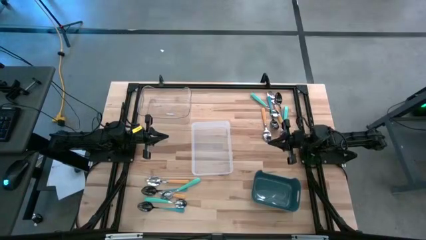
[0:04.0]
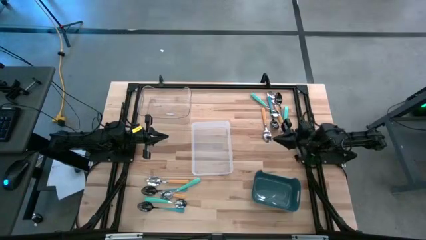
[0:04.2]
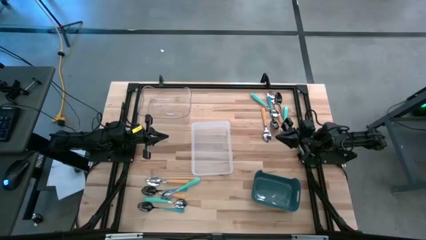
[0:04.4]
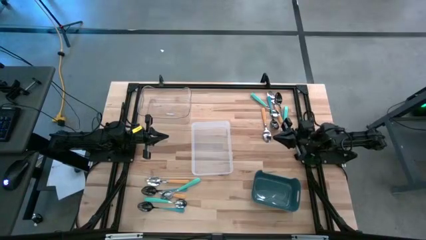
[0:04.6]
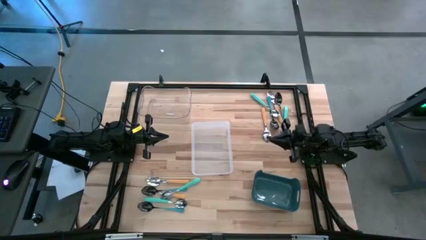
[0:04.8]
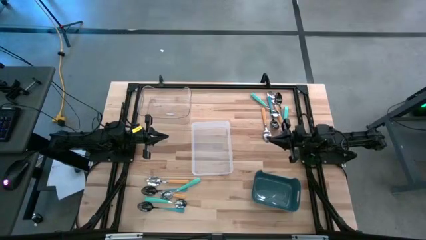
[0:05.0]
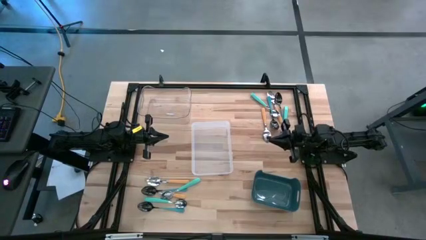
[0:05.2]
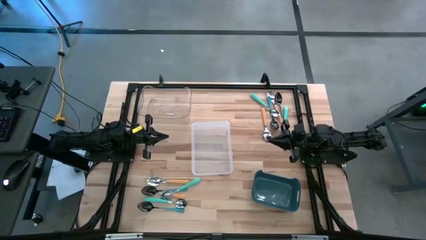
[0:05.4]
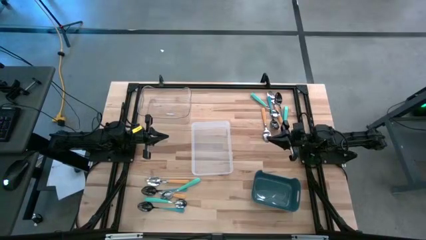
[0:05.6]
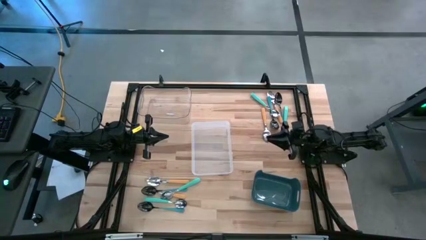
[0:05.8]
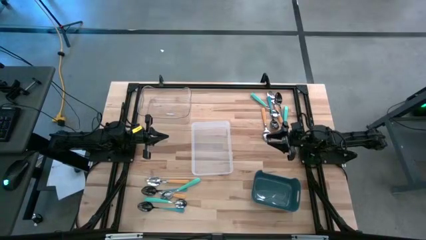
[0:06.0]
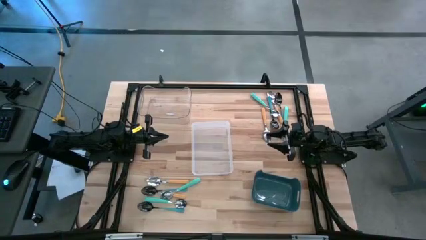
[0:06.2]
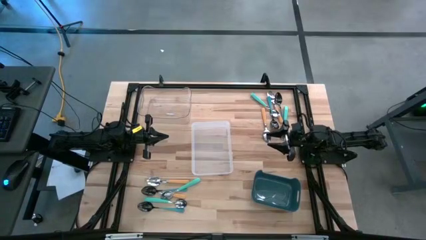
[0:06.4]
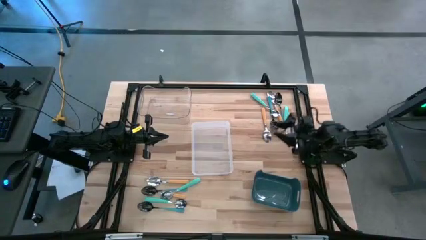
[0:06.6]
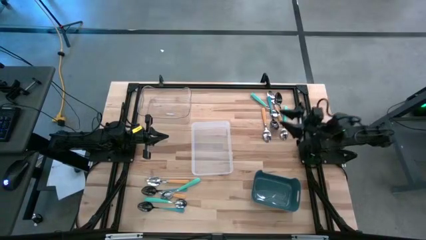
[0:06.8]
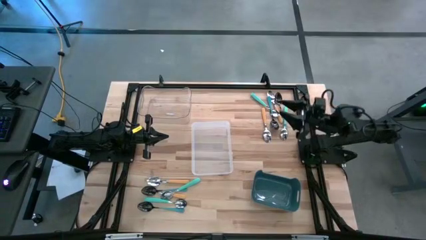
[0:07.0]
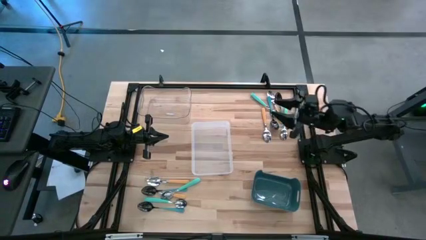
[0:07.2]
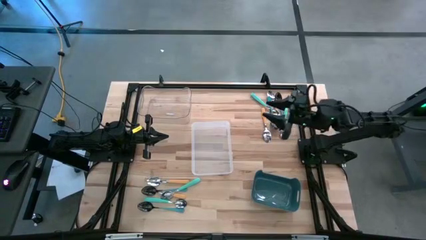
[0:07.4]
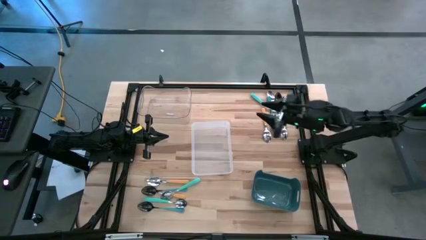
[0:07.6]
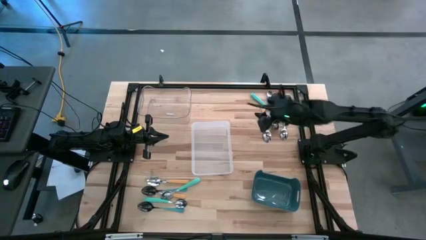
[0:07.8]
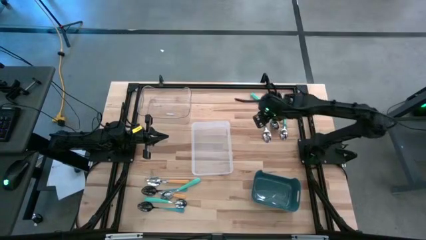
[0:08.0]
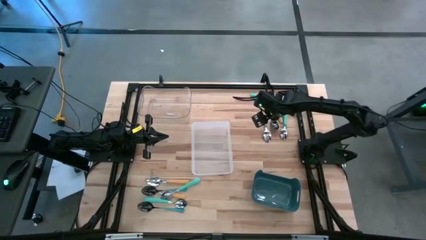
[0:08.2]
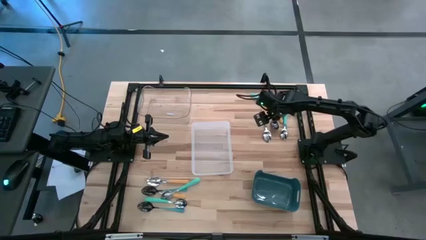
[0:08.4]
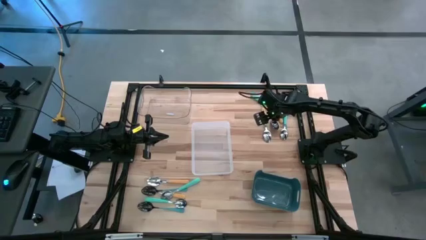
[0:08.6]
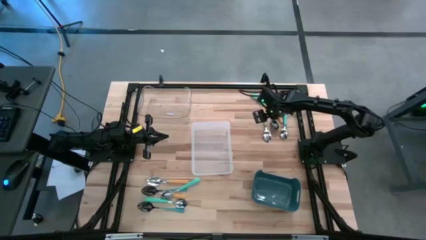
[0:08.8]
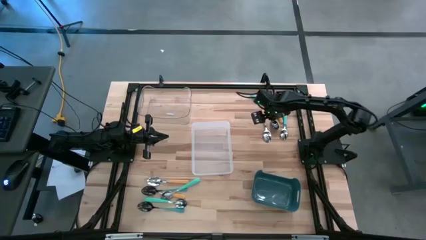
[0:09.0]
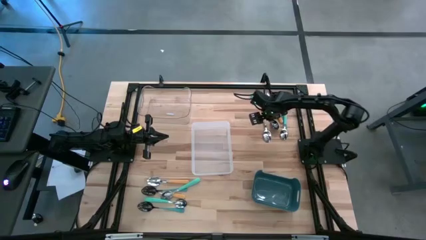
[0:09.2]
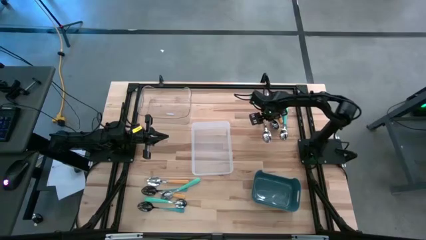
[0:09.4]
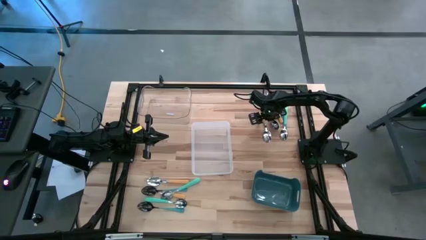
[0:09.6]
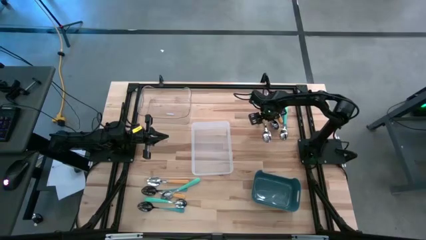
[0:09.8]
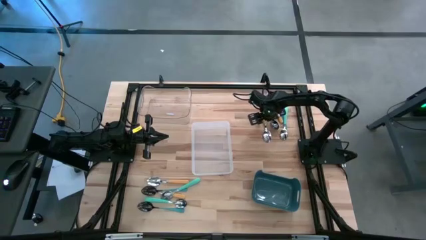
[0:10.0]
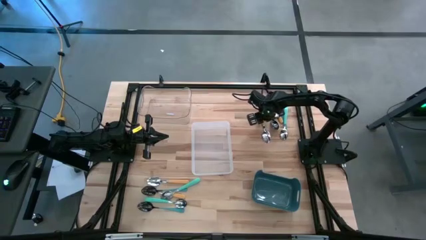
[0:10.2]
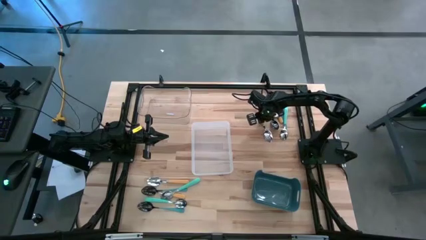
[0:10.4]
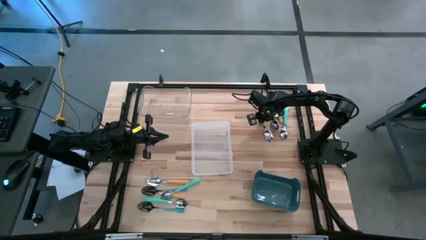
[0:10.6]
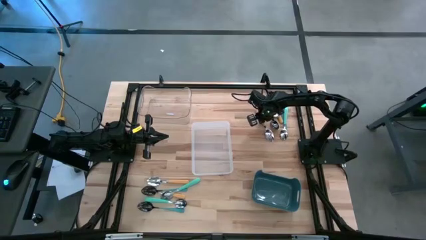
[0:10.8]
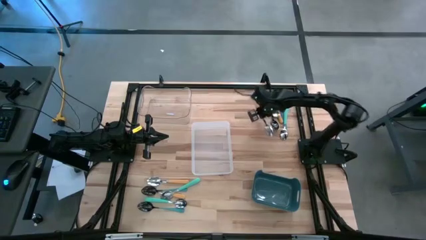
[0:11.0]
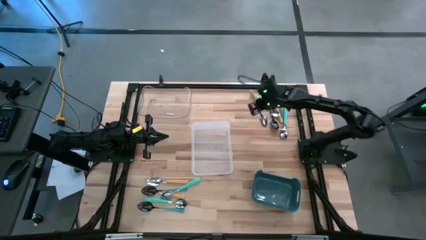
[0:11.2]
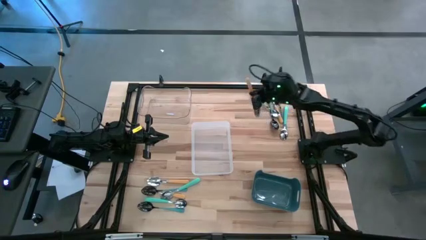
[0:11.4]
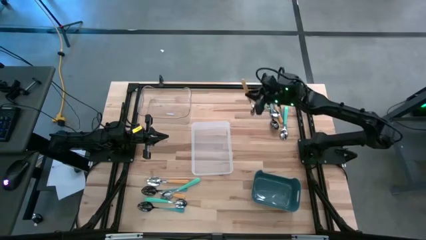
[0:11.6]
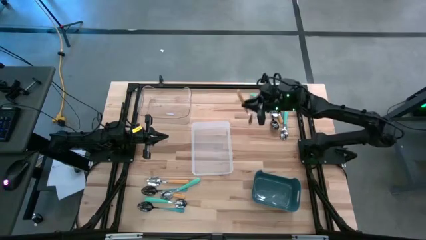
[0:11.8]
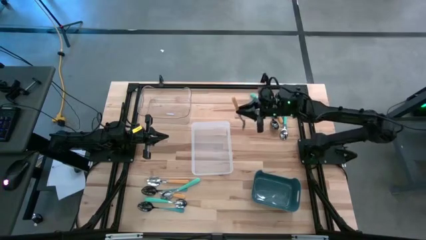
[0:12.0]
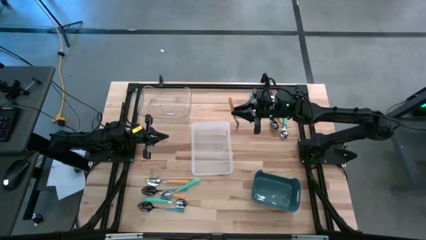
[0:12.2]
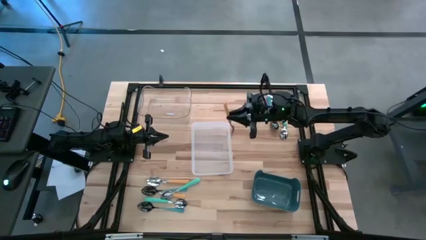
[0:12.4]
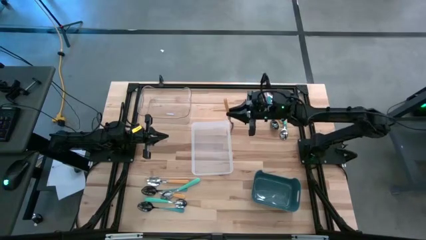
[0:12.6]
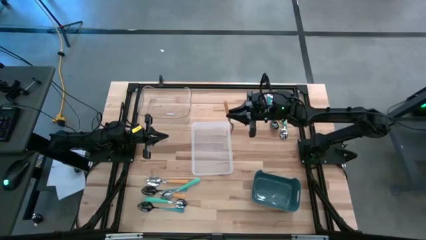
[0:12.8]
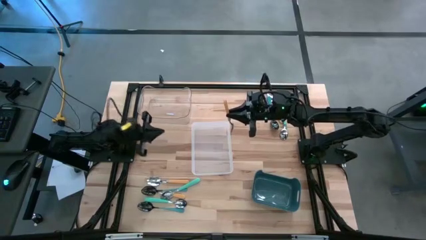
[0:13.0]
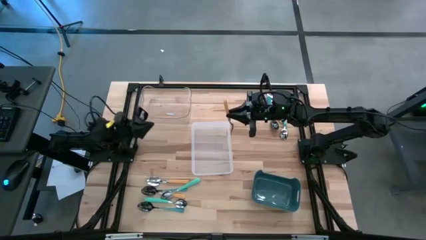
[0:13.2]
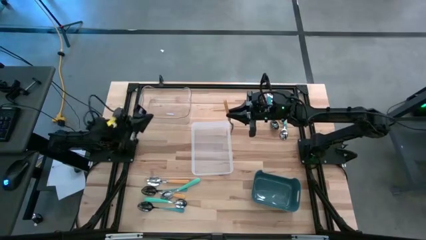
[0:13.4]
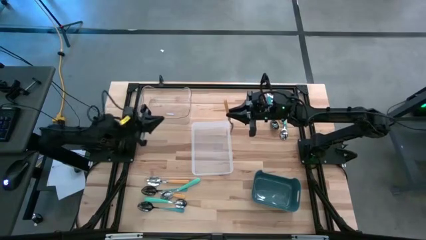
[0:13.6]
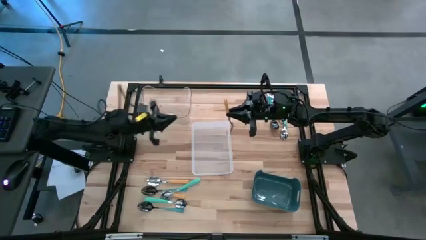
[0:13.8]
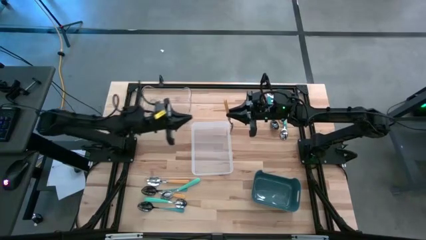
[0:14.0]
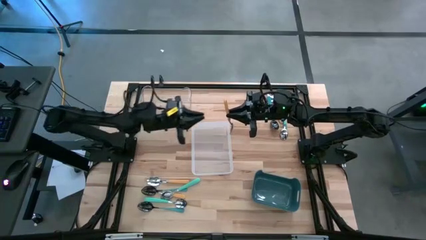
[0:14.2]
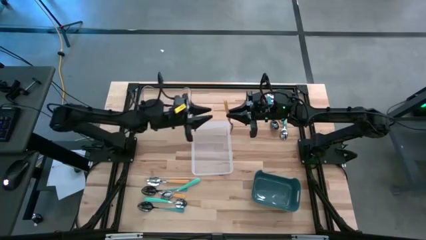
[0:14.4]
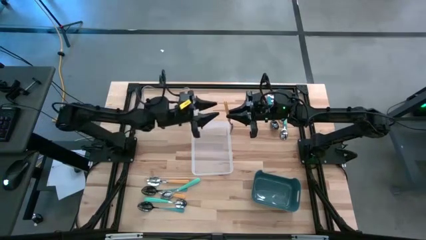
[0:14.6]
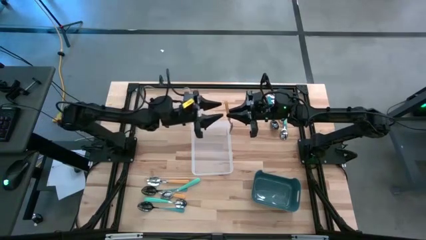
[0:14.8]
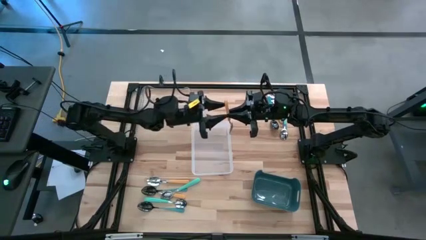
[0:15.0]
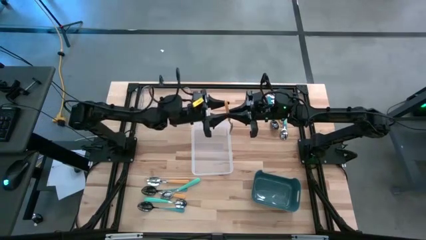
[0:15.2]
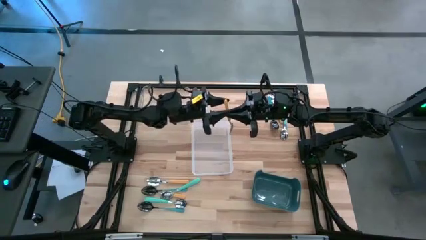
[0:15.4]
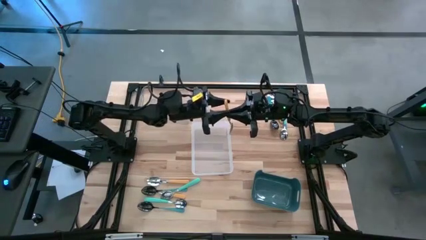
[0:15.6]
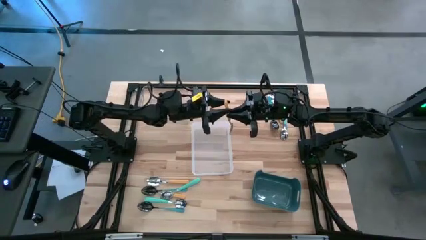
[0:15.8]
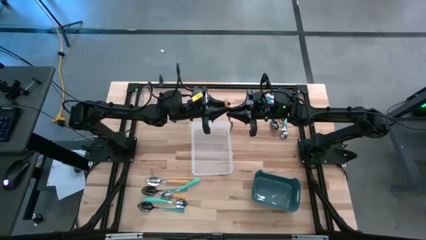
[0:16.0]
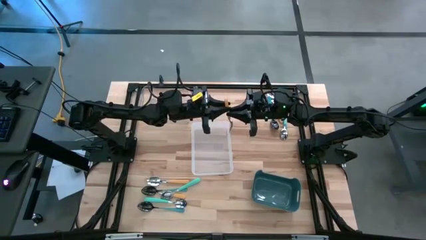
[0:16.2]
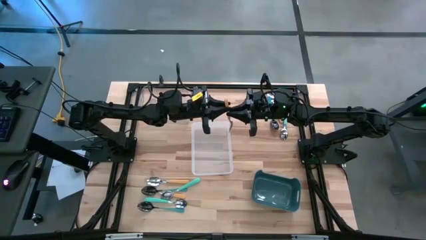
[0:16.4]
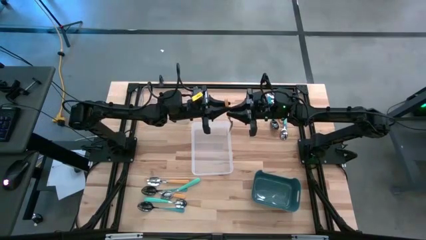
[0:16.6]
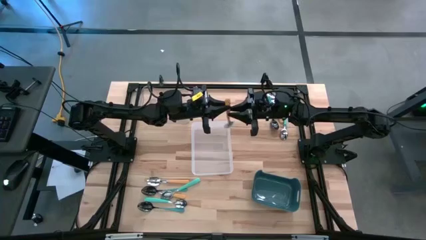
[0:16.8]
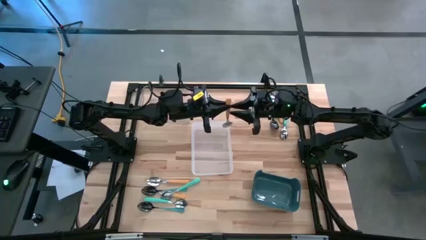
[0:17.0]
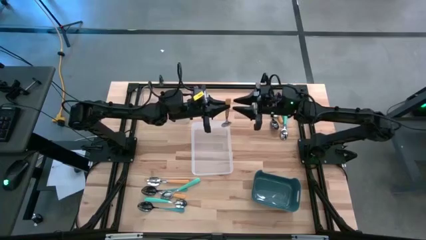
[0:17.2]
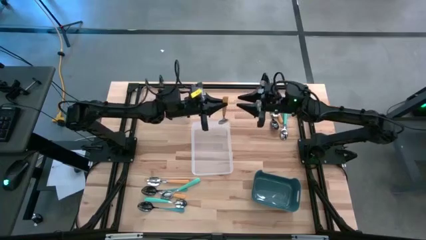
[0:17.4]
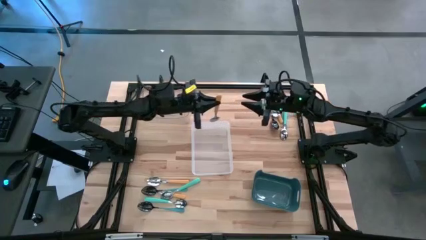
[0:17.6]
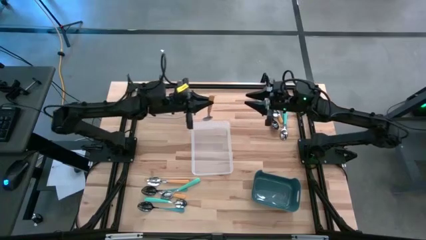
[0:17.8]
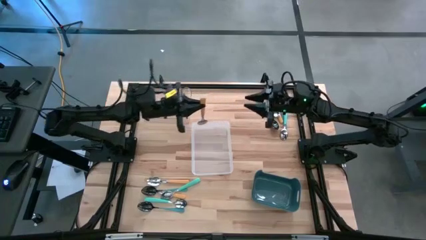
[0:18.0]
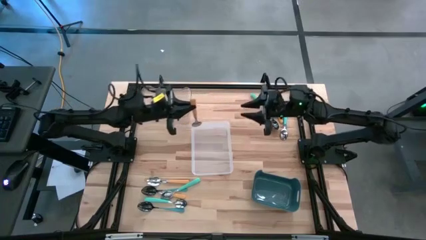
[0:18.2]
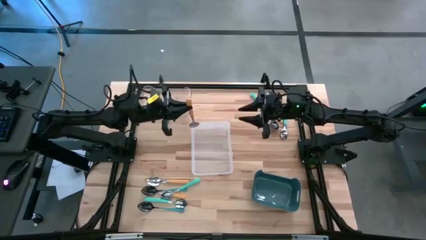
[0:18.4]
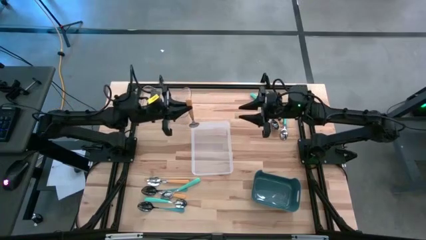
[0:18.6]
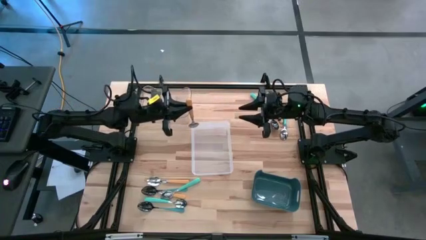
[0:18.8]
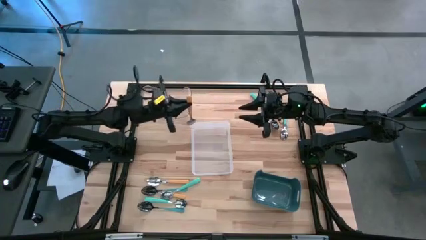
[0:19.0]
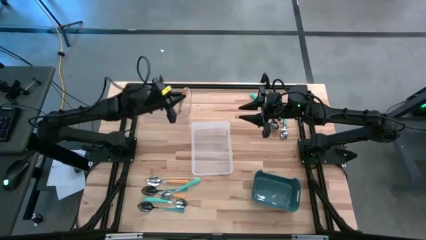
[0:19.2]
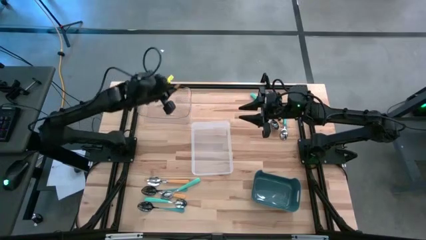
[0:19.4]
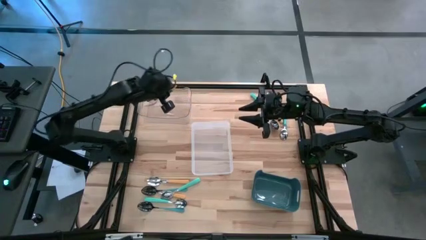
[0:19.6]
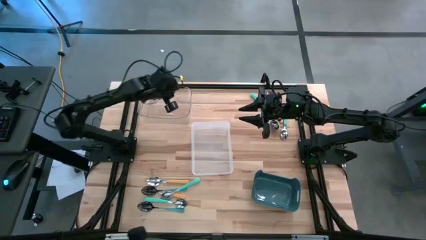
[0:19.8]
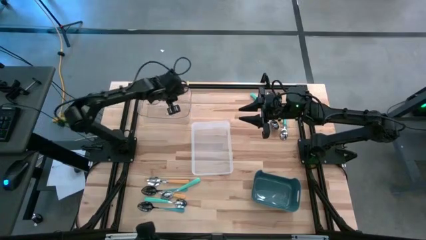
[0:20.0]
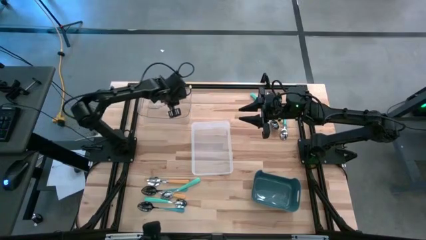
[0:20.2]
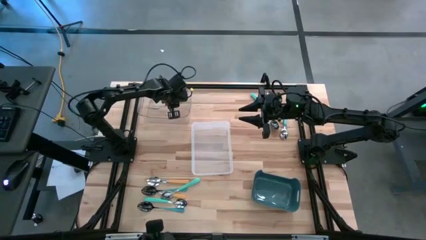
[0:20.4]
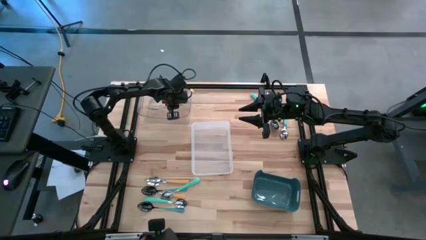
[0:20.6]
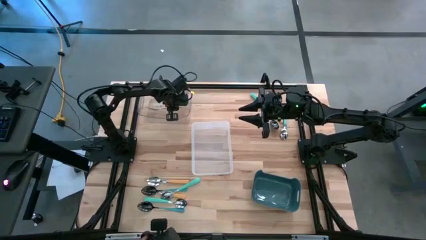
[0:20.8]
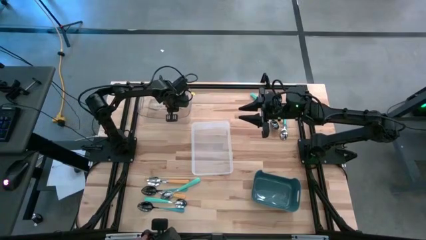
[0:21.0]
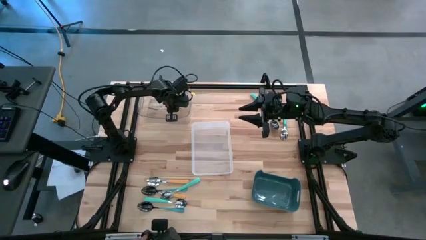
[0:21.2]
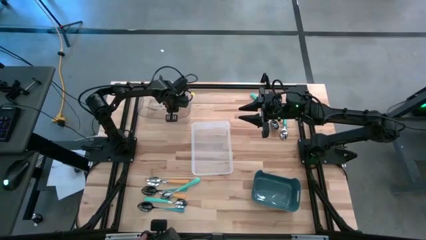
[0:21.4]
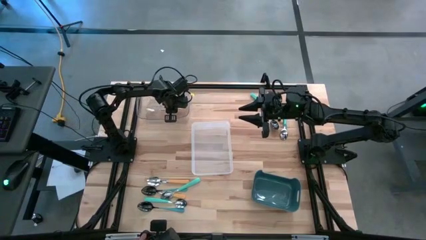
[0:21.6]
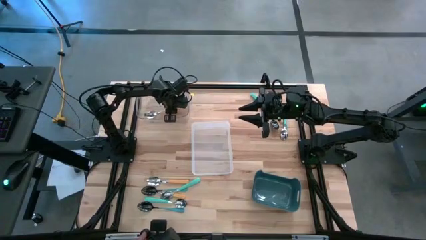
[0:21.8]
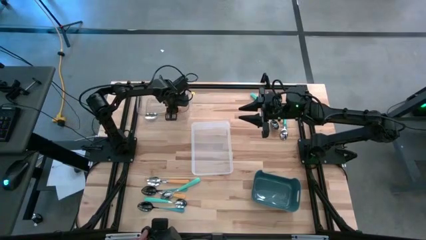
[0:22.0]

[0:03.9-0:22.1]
Task: Sort silverware by color (type)
Put the yellow spoon into the transparent bin
